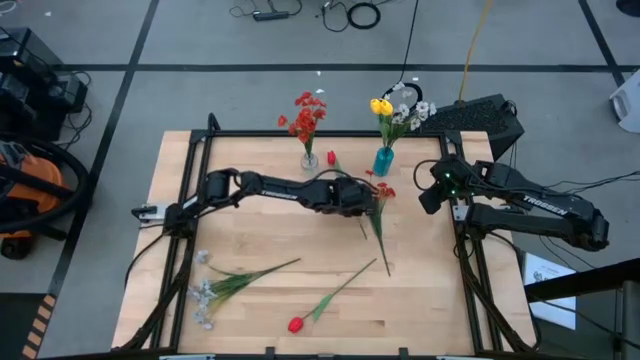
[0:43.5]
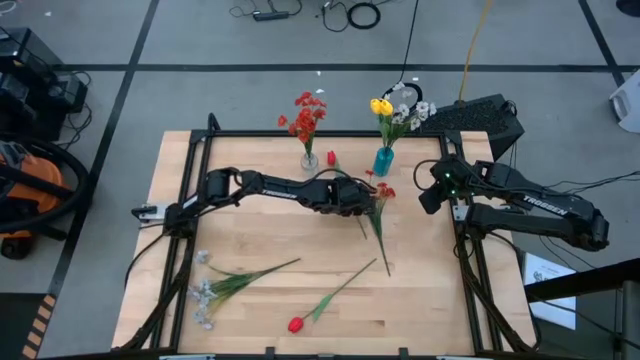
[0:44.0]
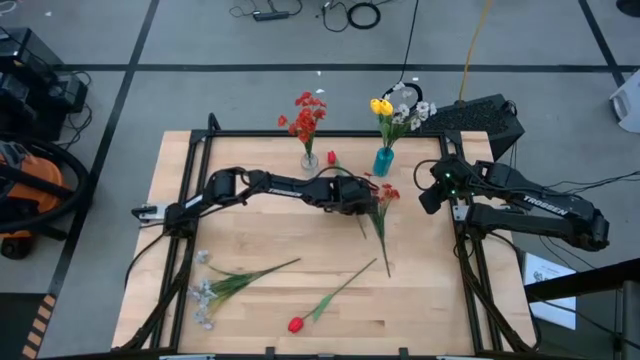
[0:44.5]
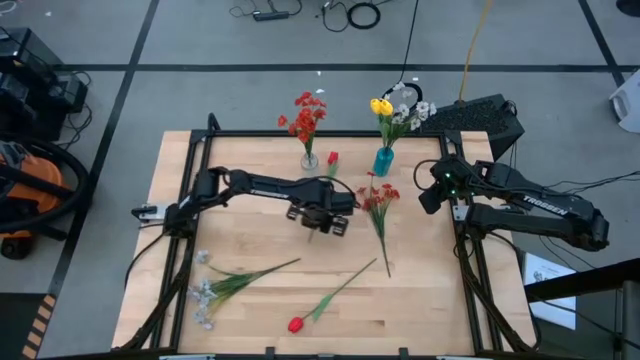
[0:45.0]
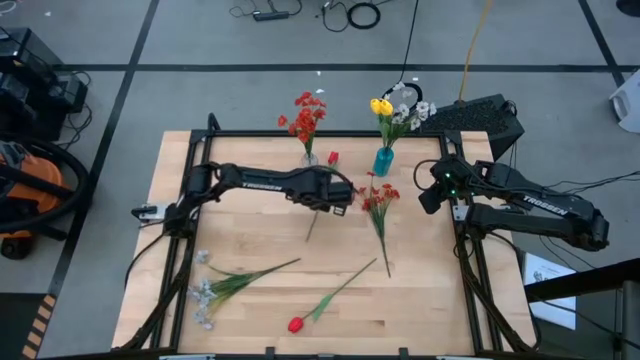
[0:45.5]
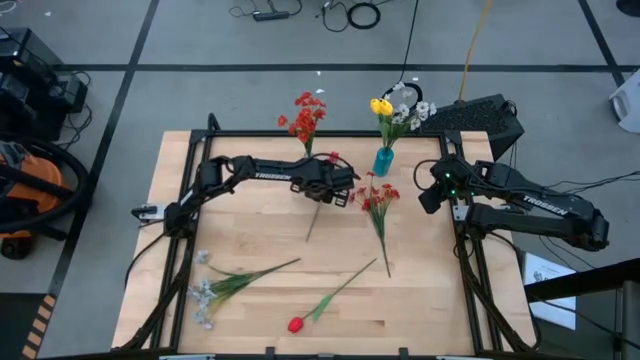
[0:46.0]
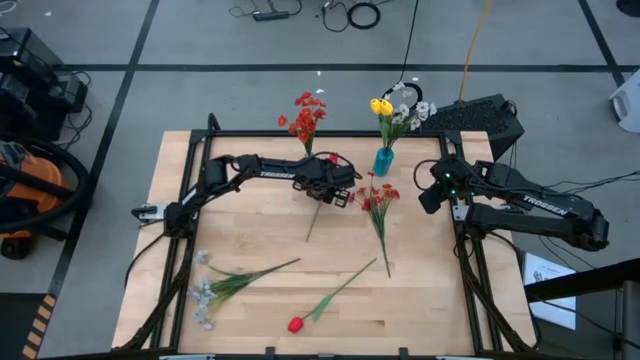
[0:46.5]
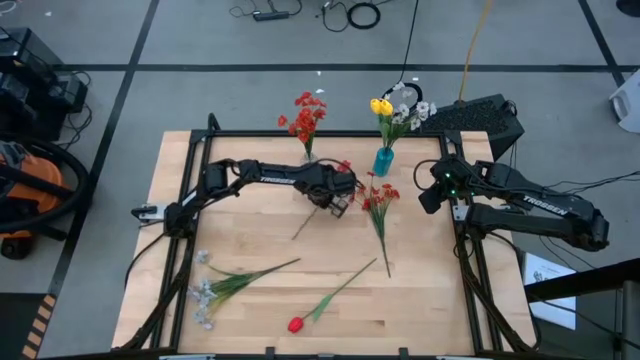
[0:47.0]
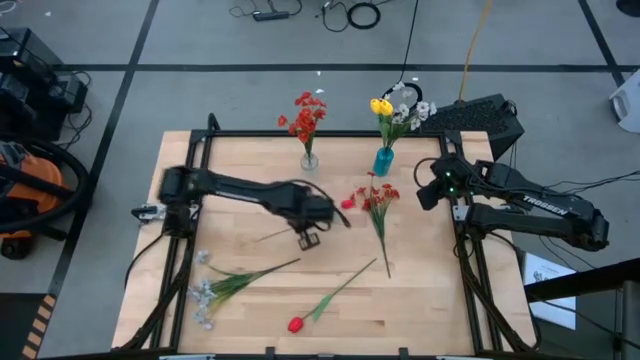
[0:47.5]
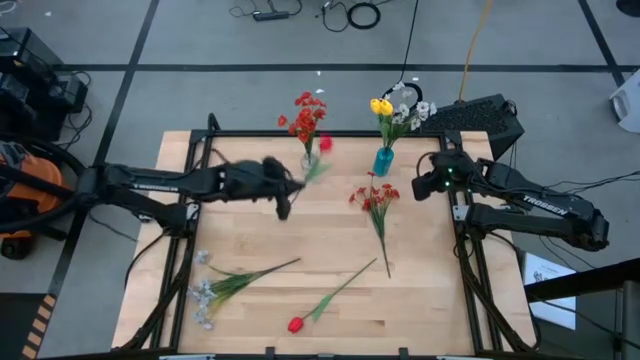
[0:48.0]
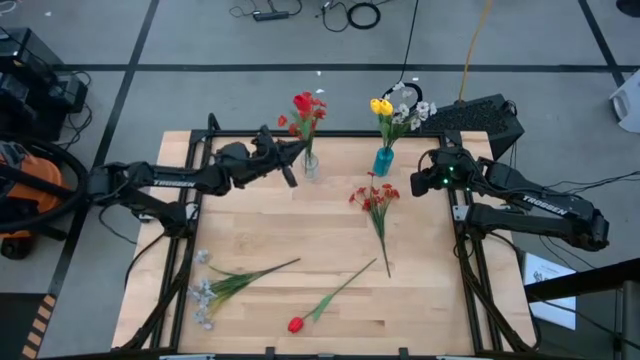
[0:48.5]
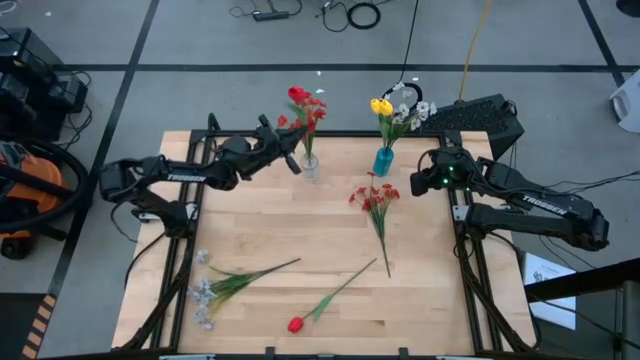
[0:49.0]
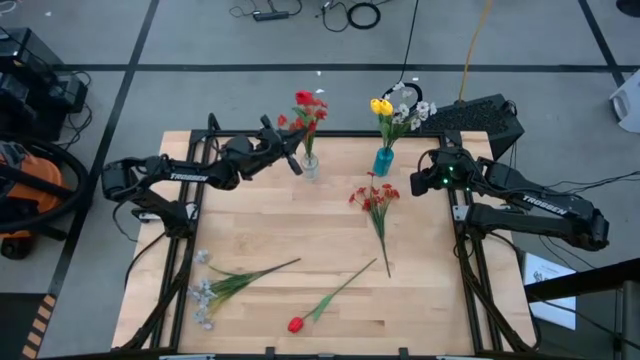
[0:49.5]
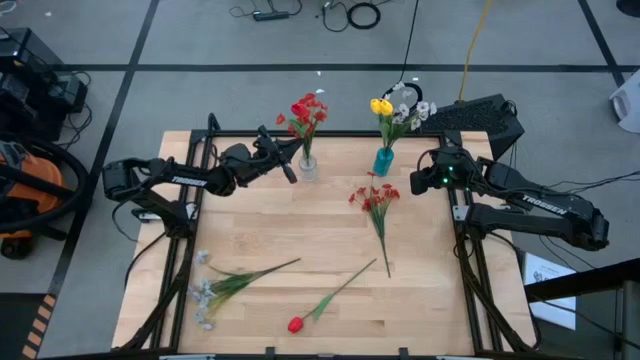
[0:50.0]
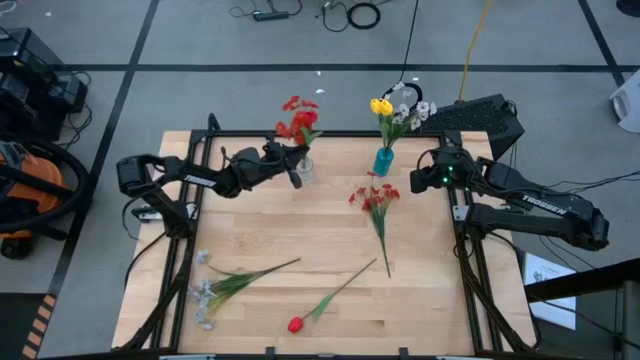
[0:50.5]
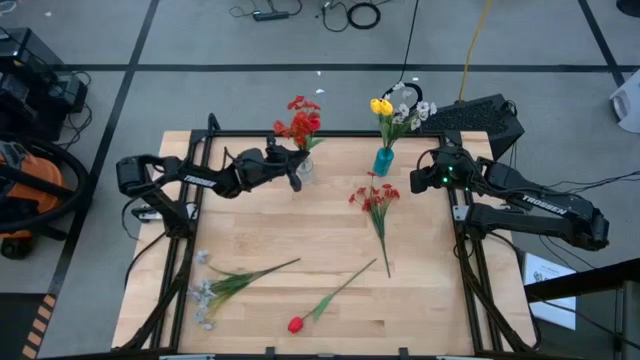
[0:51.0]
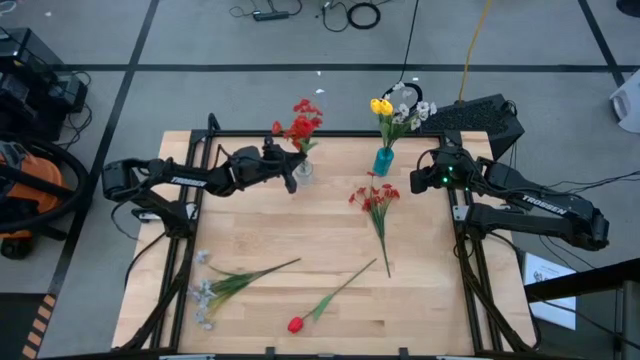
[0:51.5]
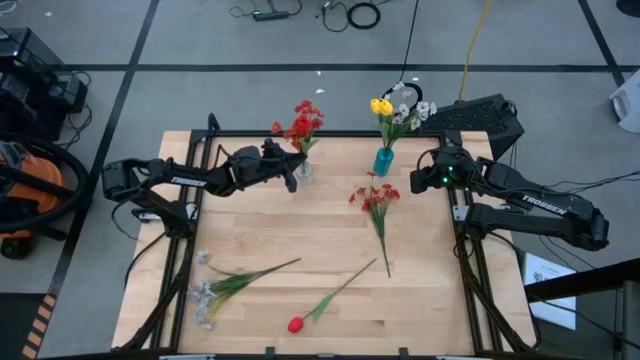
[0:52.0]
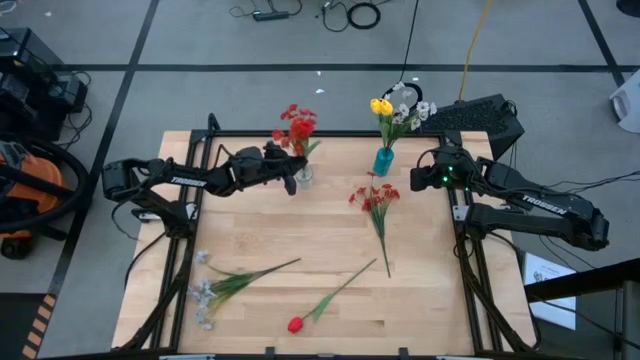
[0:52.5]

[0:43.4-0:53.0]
Task: Sort flowers into vase by color
Put the top red tulip into the transparent vase

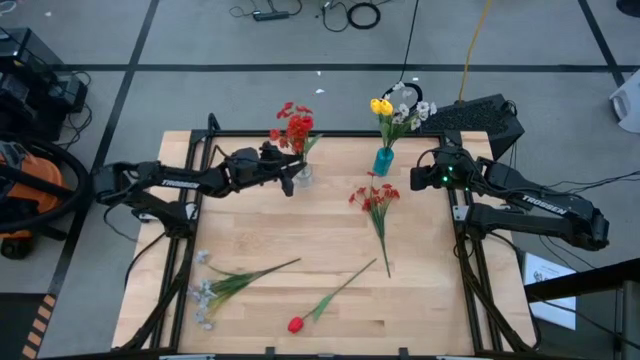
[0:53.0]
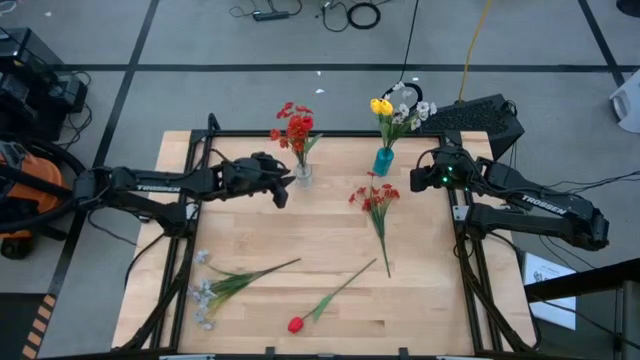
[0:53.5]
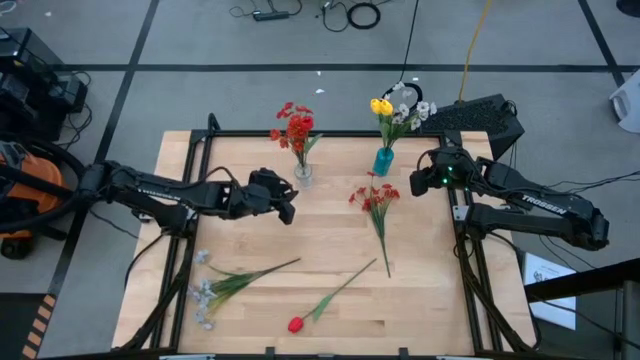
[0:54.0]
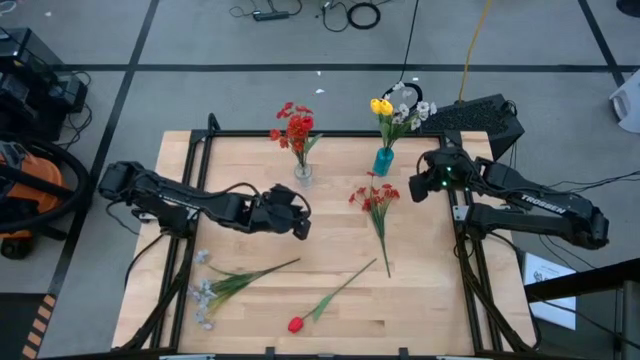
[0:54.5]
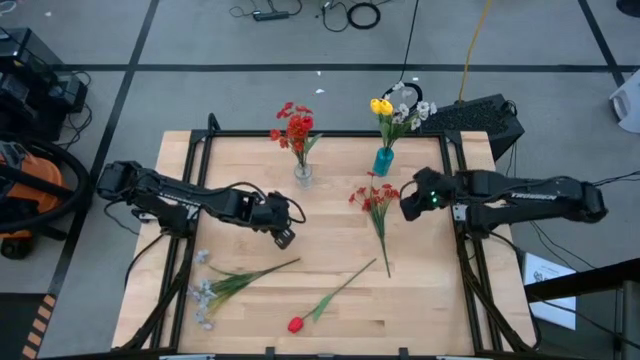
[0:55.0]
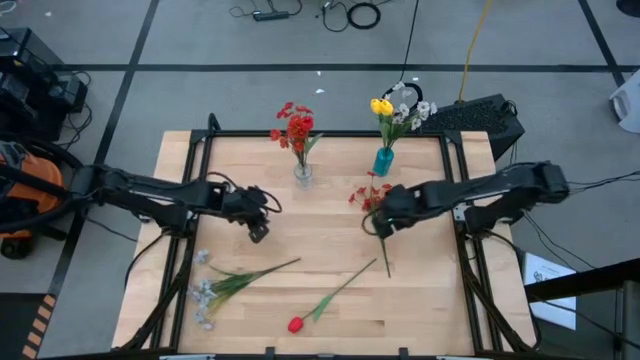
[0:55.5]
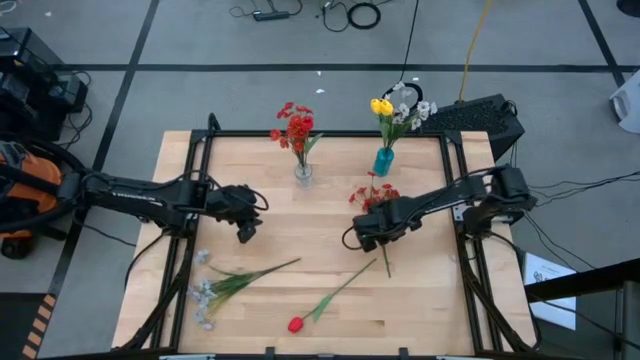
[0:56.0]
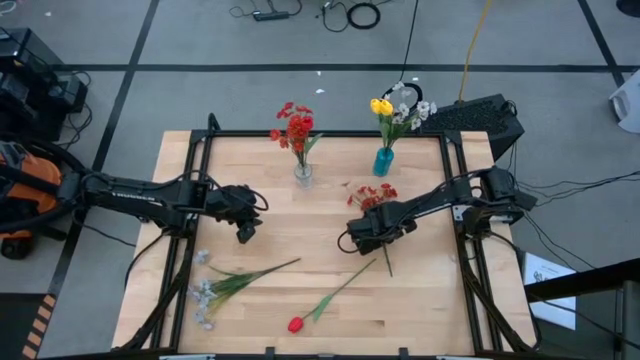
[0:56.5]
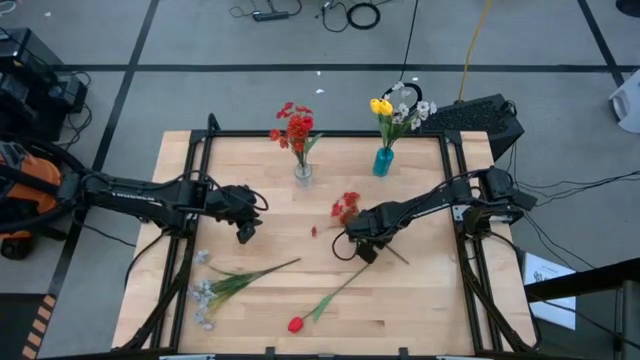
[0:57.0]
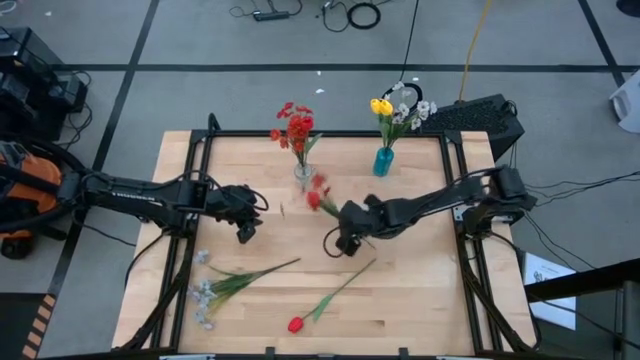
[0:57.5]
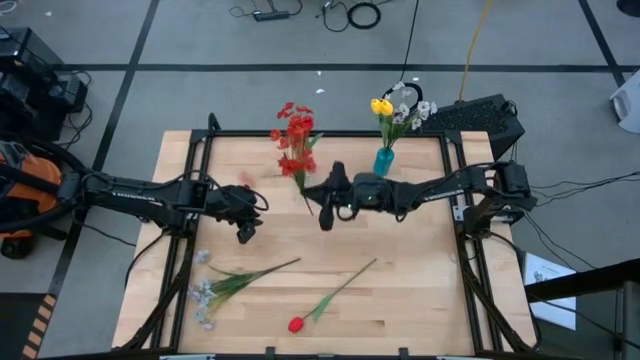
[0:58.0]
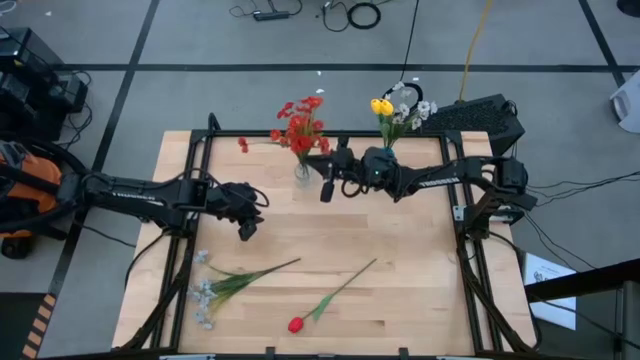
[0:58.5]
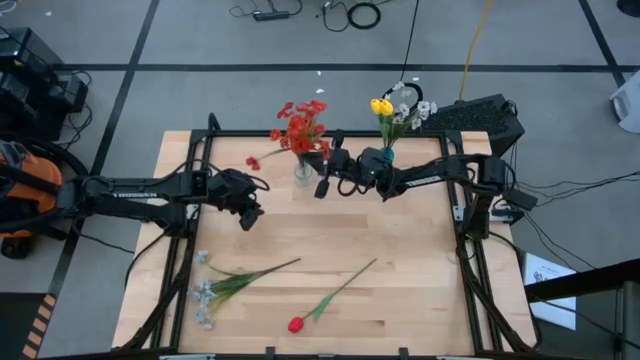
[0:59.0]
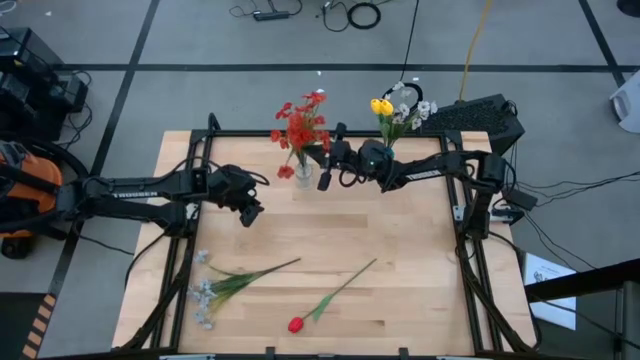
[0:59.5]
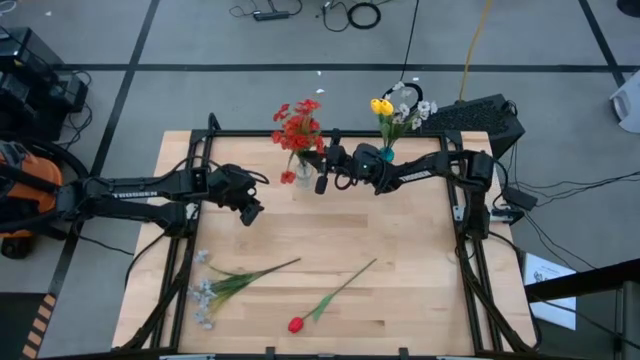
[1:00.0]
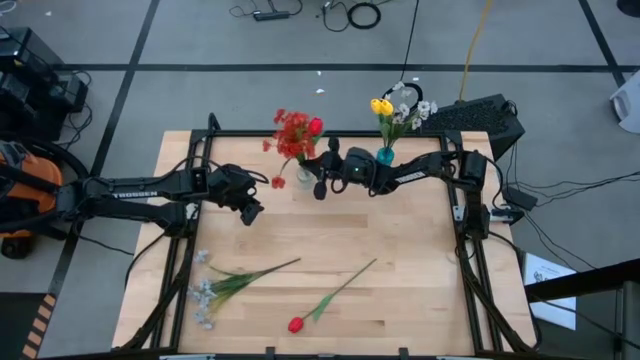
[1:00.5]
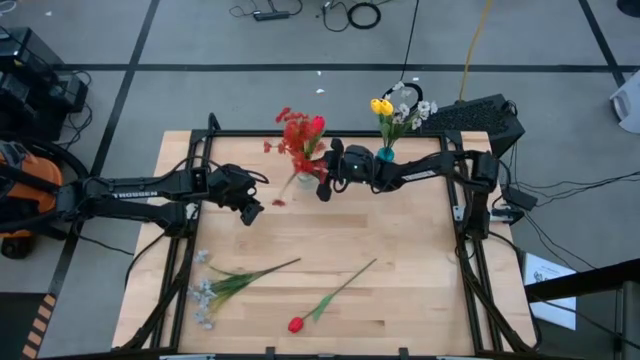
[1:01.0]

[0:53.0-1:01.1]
Put the red flower into the transparent vase

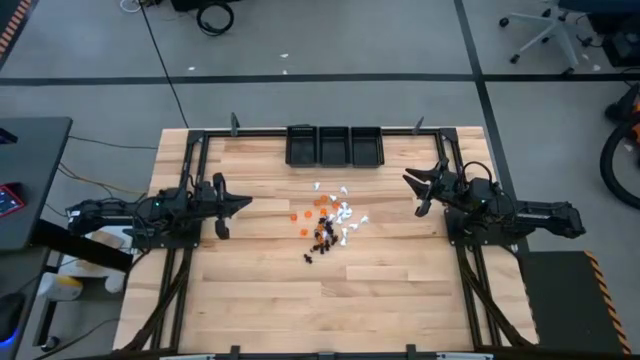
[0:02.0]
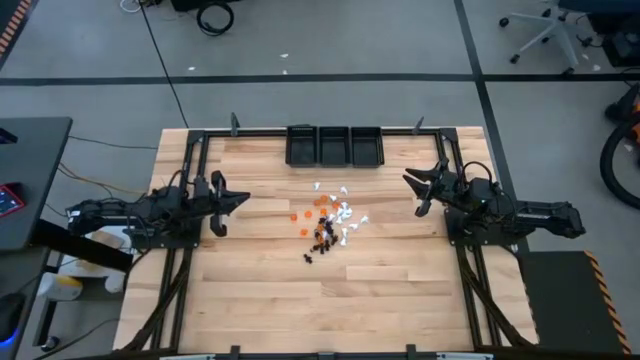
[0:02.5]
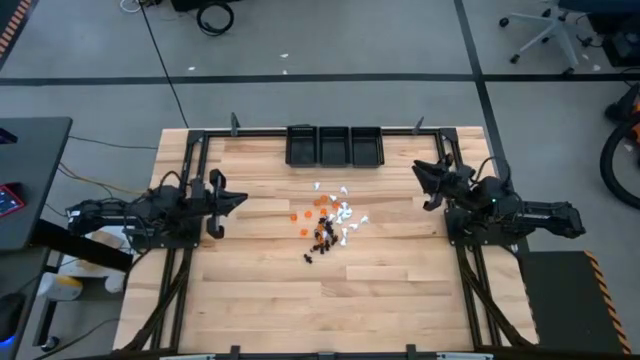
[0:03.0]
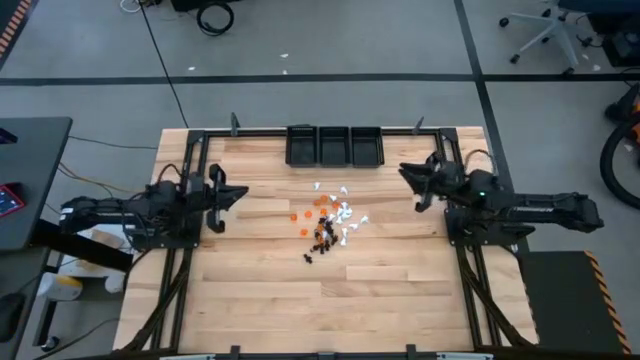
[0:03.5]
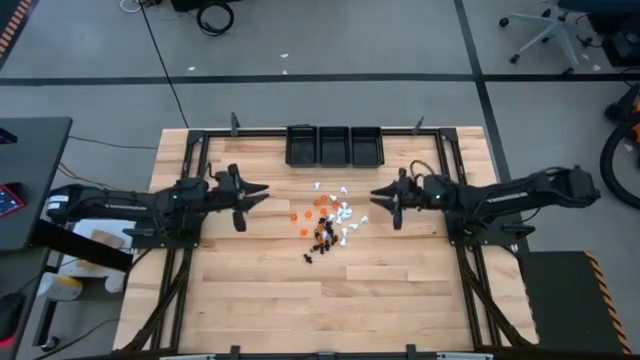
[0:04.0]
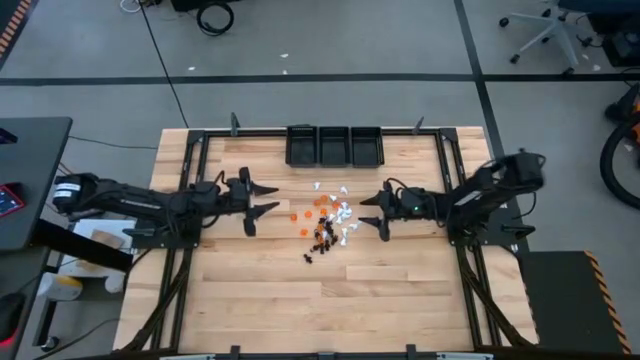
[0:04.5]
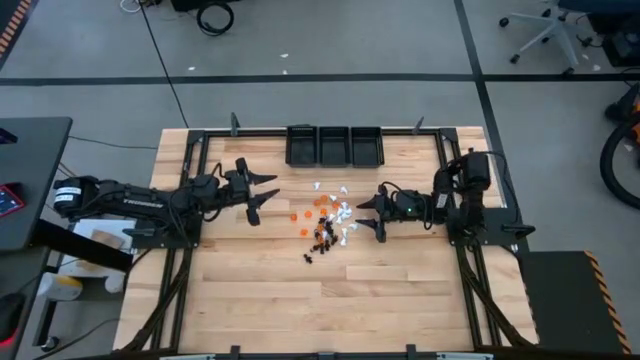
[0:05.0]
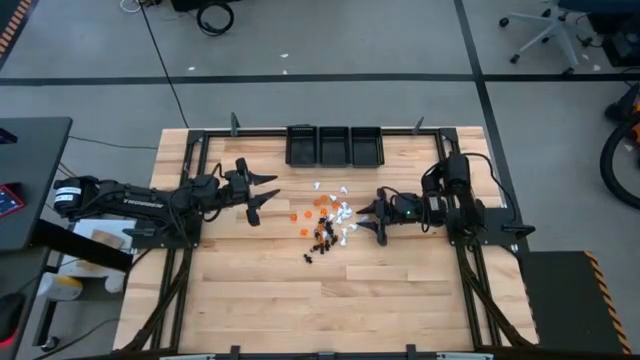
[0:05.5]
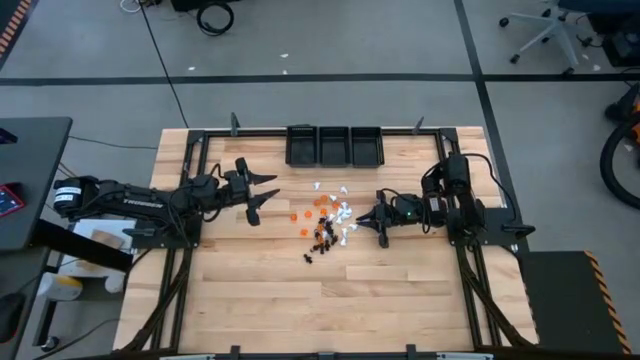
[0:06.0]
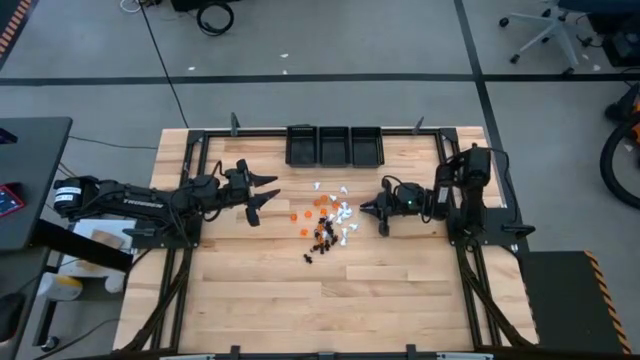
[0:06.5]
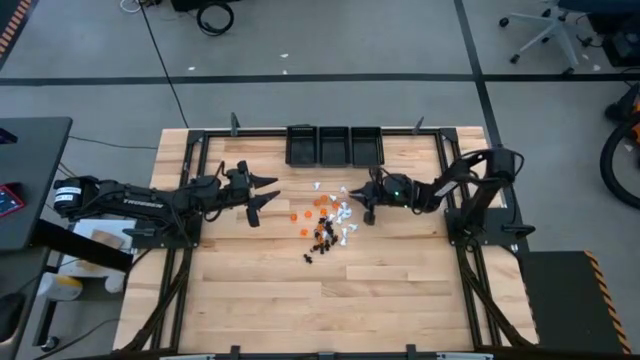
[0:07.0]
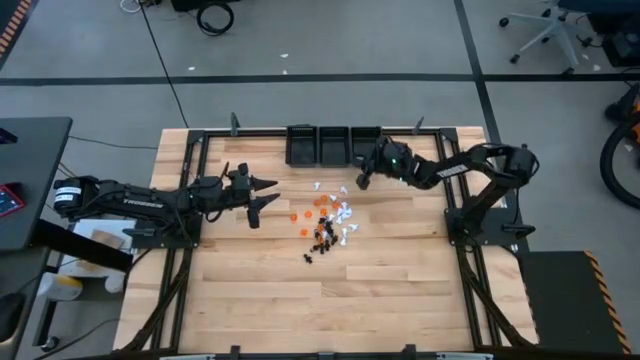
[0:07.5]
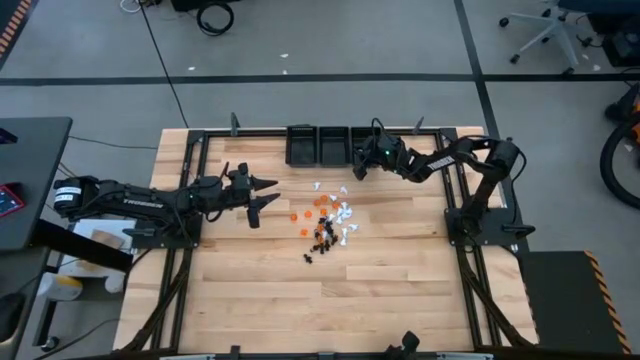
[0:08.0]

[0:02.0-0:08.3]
Task: Sort game pieces by color
Put the white game piece into the right black basket
